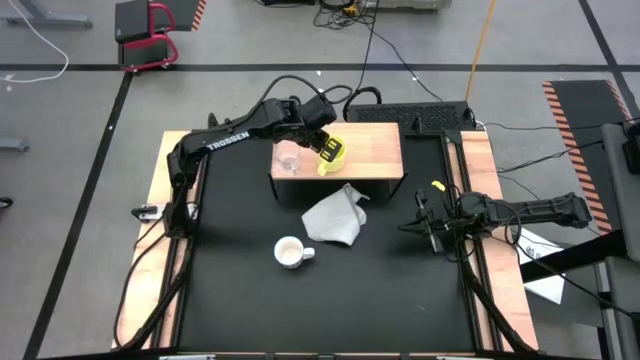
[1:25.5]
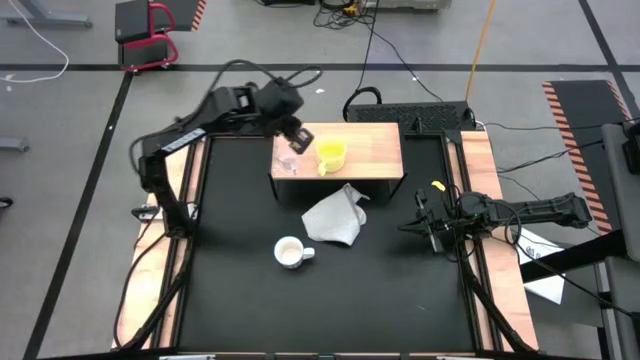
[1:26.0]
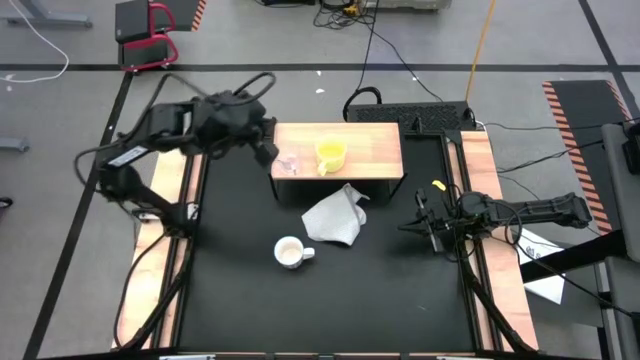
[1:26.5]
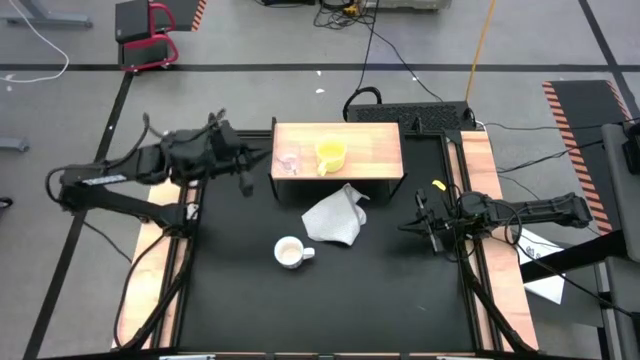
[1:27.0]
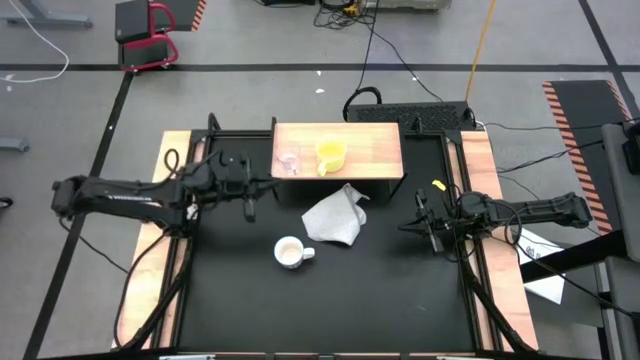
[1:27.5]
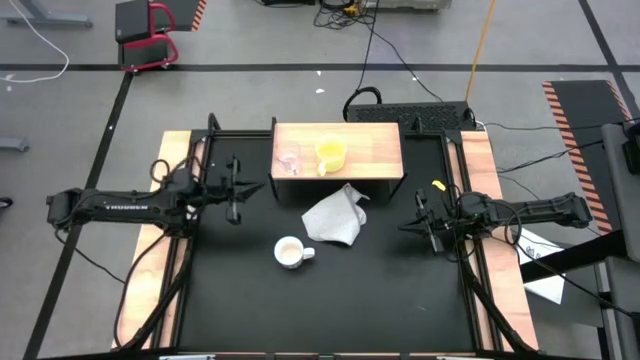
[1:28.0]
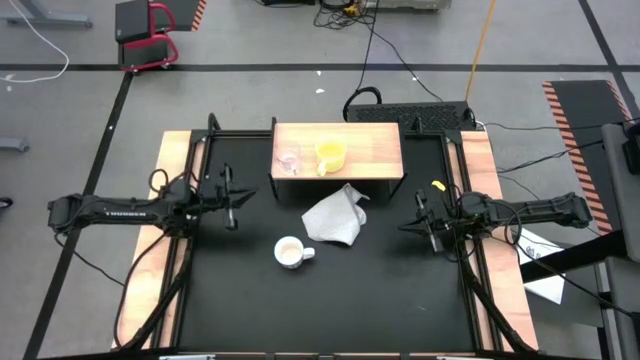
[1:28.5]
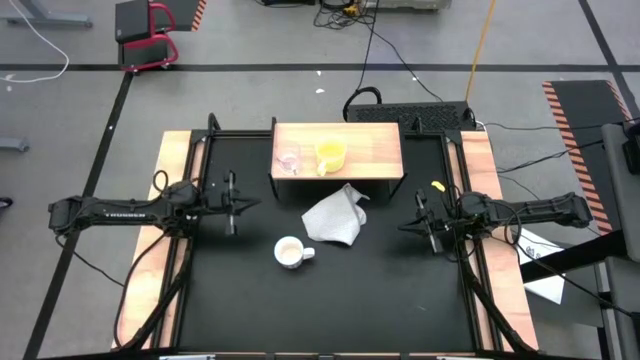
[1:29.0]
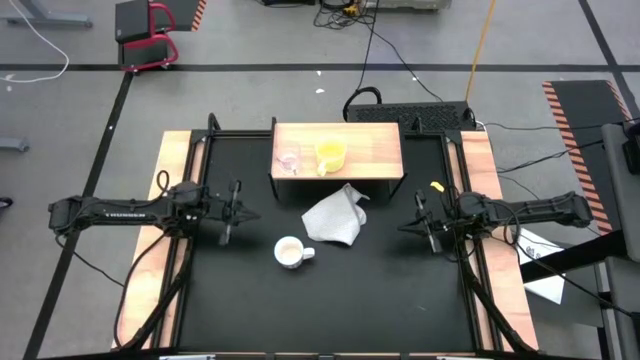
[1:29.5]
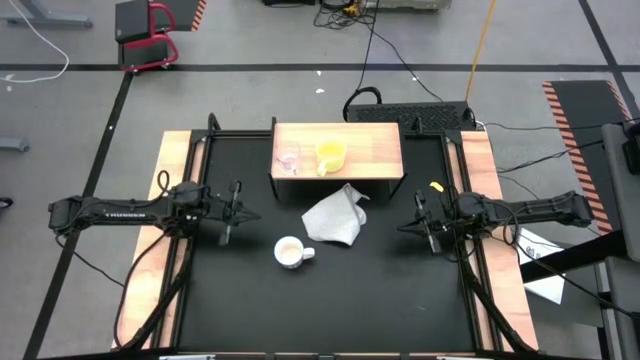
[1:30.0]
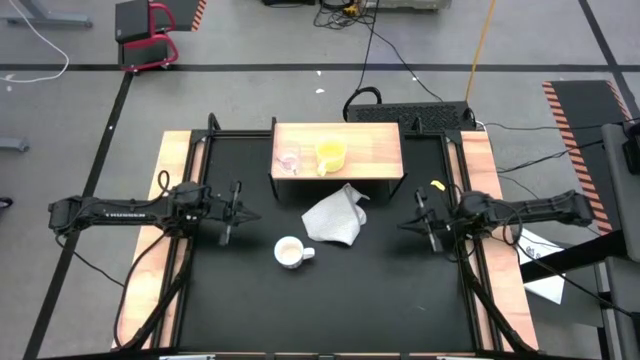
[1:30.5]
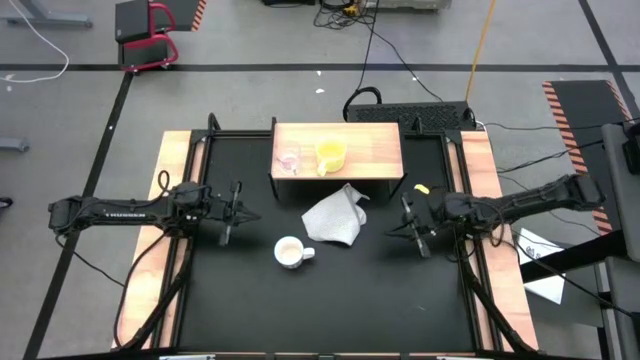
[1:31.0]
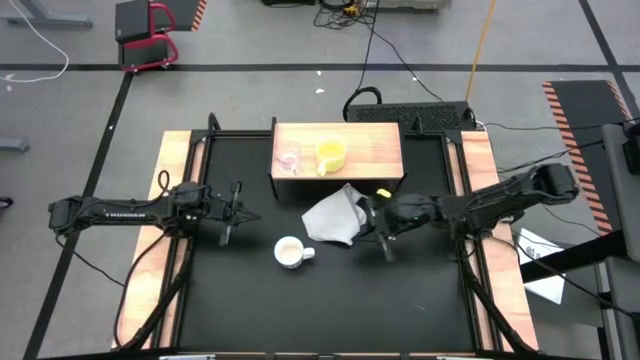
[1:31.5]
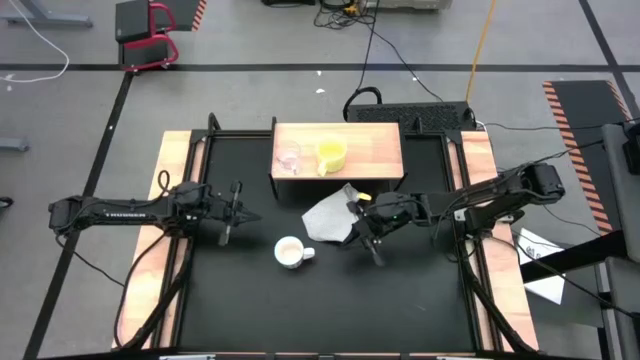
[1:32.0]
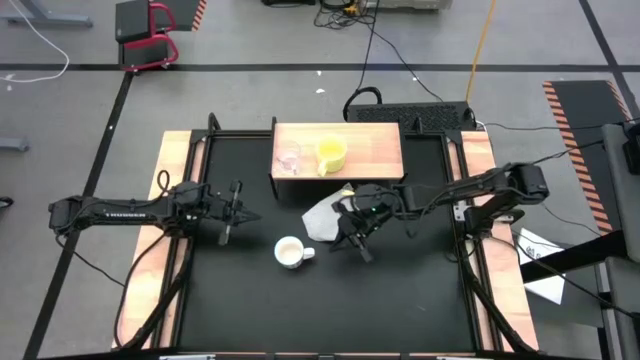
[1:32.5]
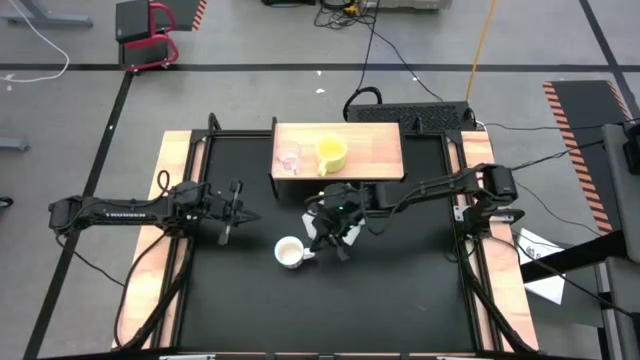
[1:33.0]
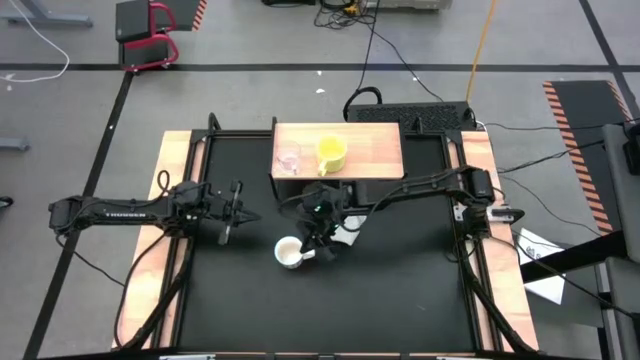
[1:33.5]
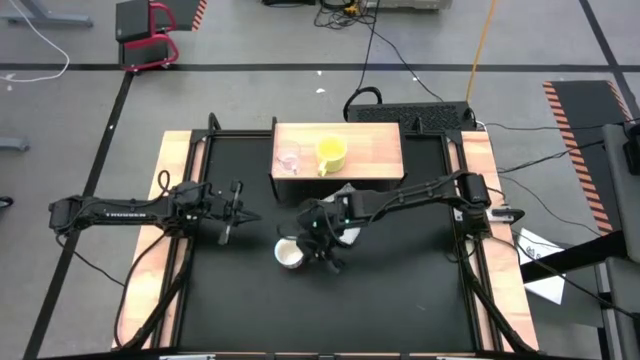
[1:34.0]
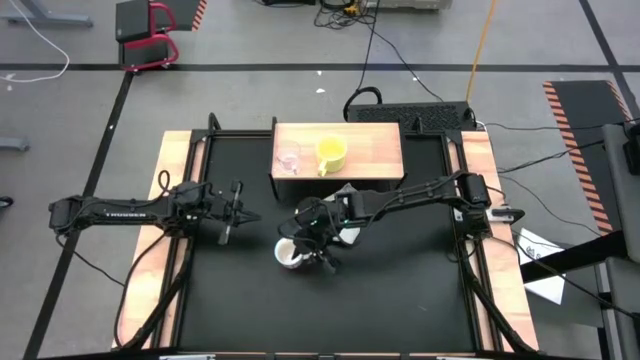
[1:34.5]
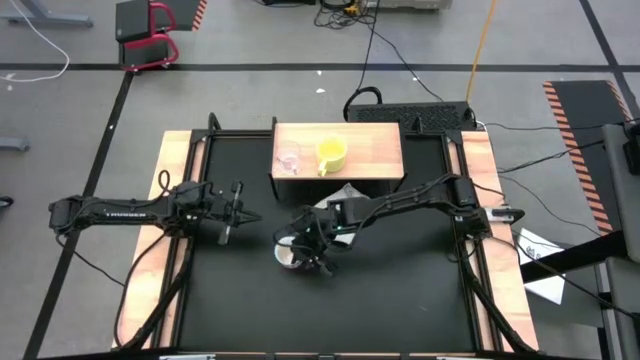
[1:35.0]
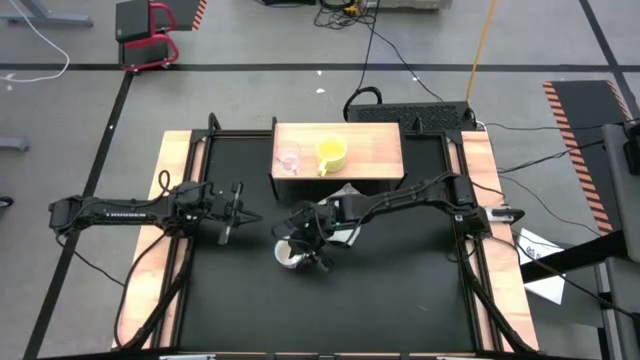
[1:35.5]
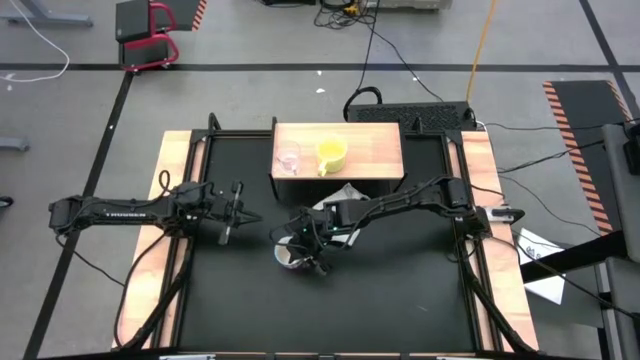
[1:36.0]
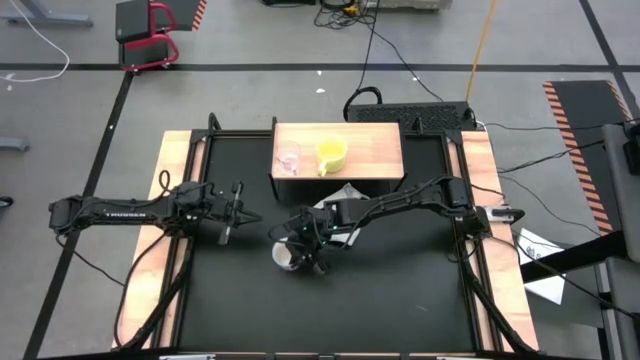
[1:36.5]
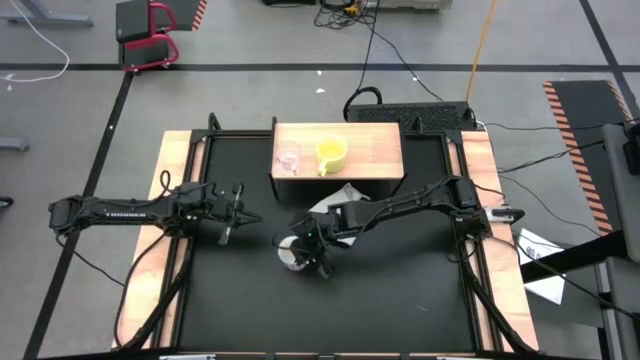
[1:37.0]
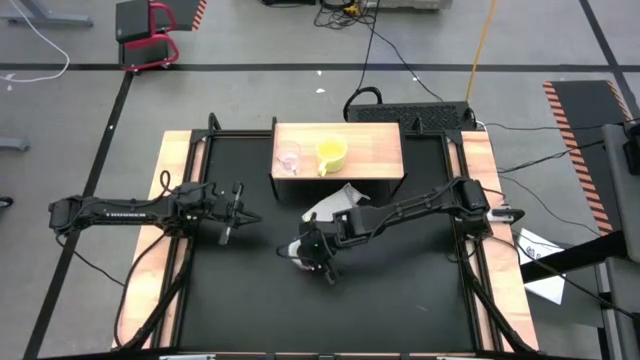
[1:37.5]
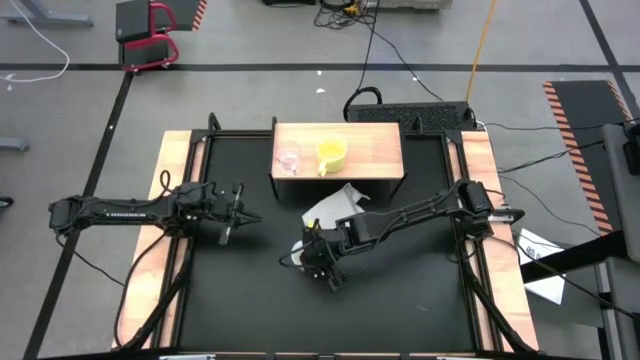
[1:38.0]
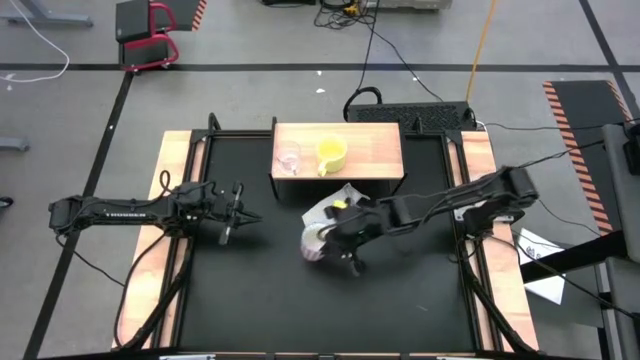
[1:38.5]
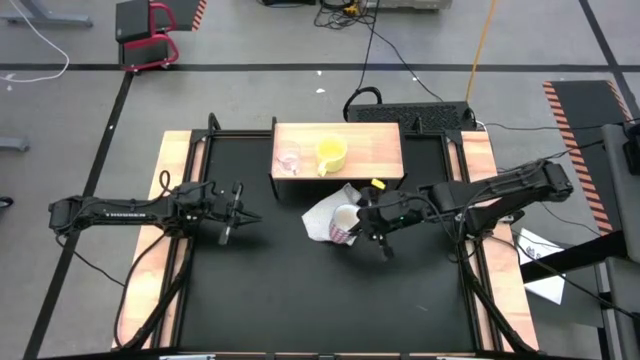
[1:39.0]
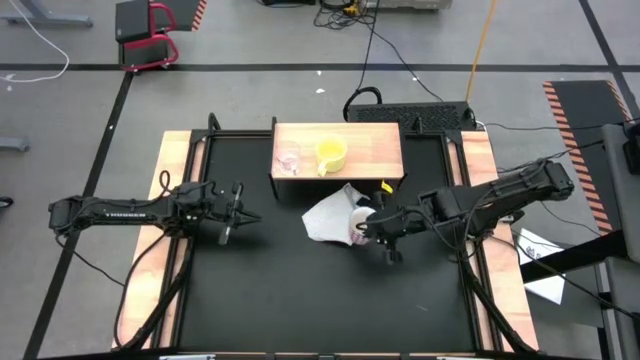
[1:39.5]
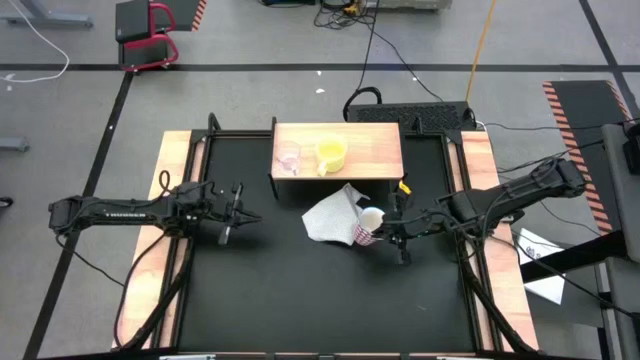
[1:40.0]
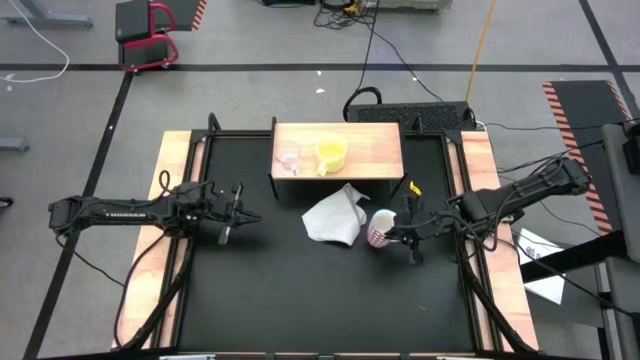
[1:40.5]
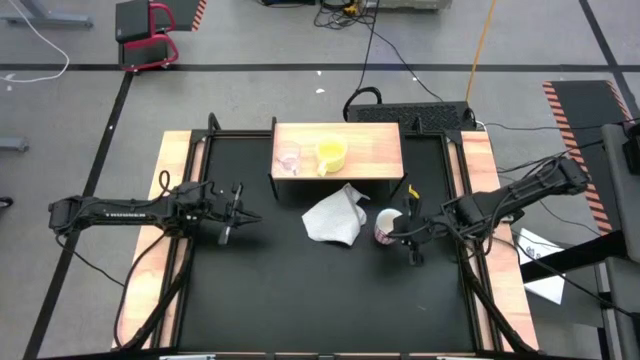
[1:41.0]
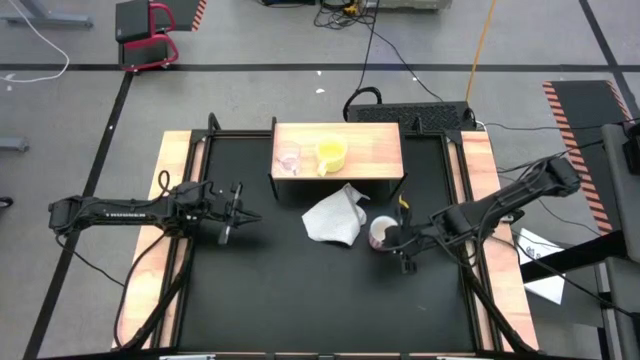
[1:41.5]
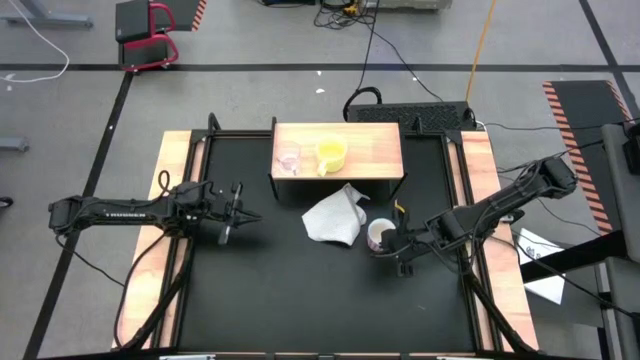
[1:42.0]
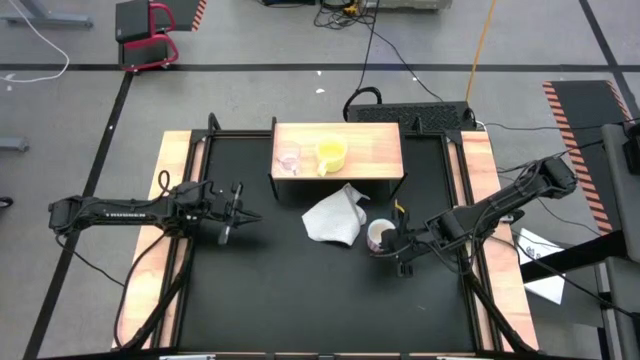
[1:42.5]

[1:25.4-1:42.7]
Task: Stack small to large cups/mugs on shelf
Move the red pattern white mug near the shelf

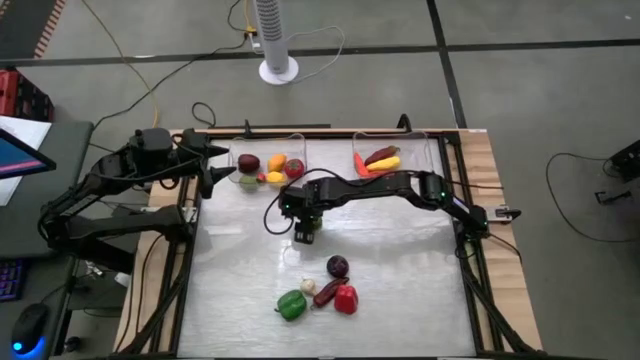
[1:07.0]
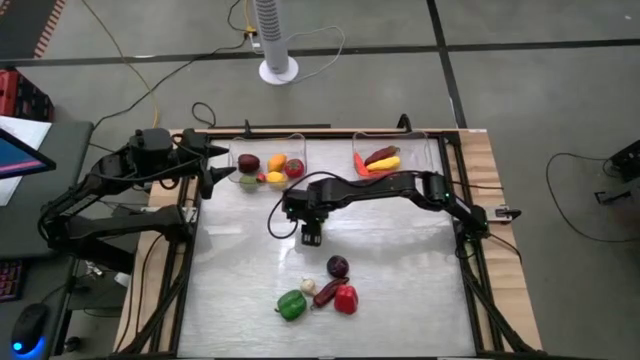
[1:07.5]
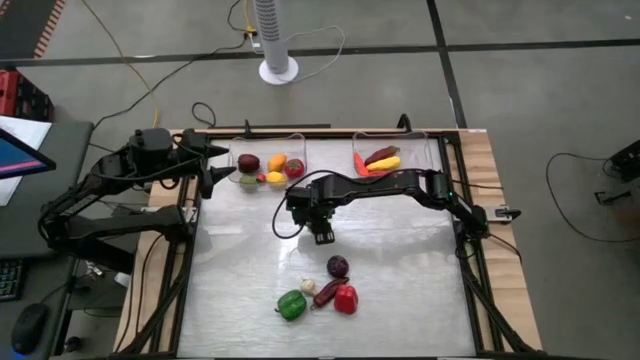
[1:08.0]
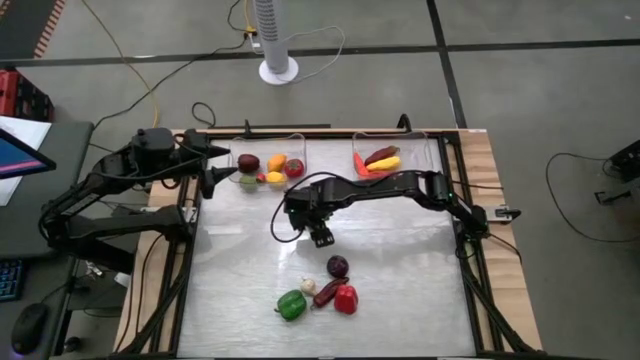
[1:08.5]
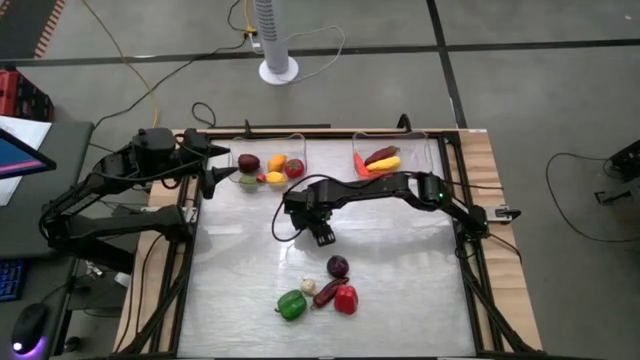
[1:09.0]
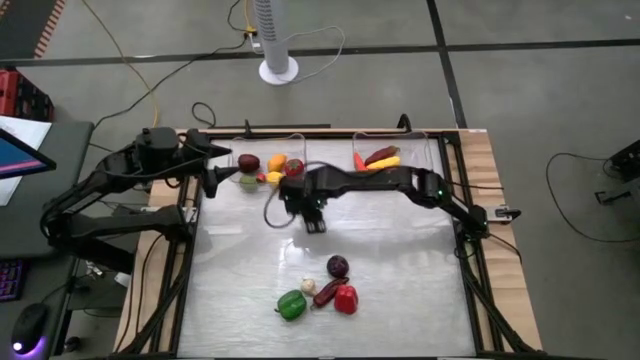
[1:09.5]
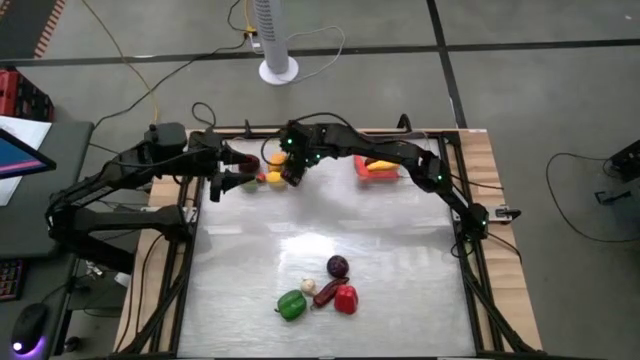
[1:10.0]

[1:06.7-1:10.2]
Task: Sort produce into baskets
Put the green lemon into the left transparent bin
